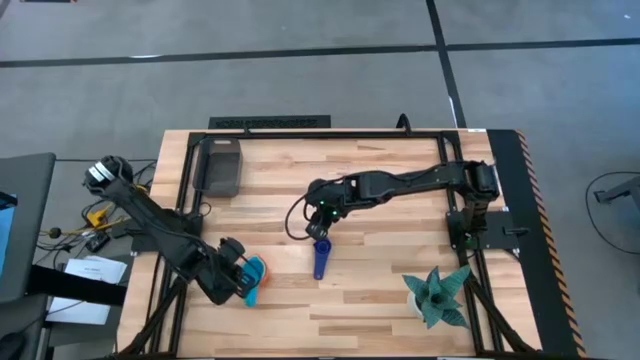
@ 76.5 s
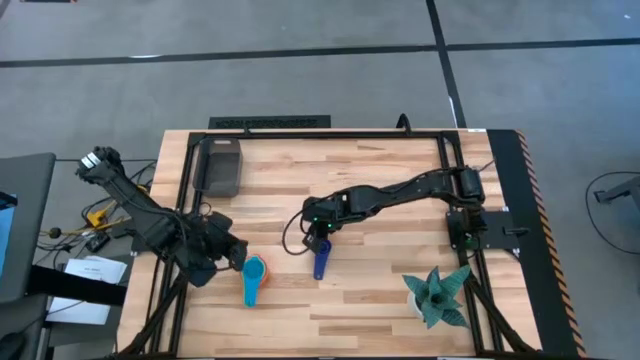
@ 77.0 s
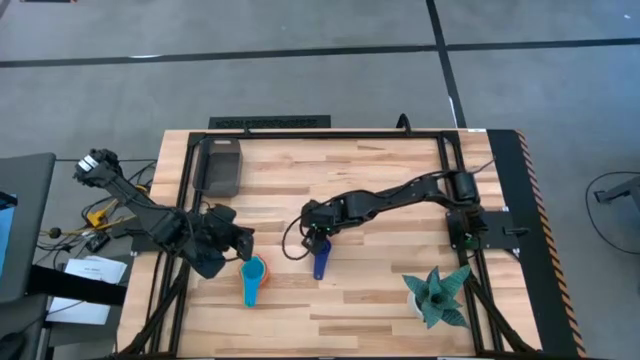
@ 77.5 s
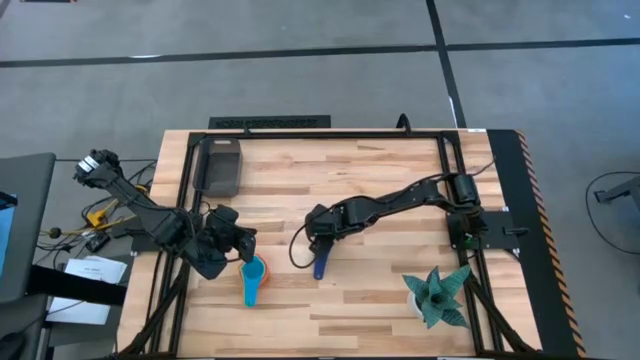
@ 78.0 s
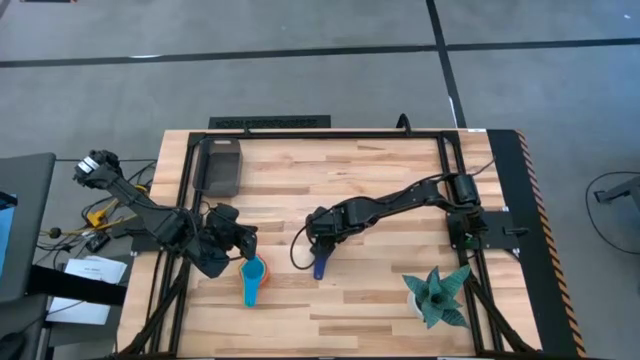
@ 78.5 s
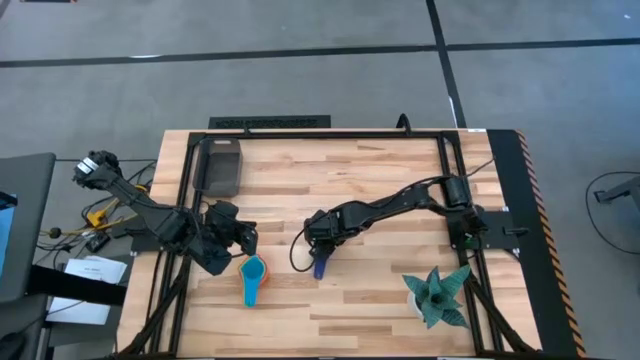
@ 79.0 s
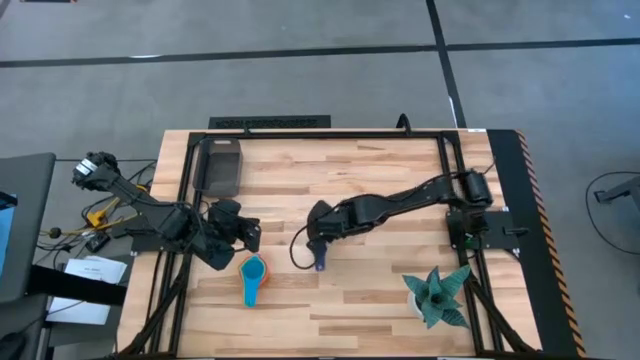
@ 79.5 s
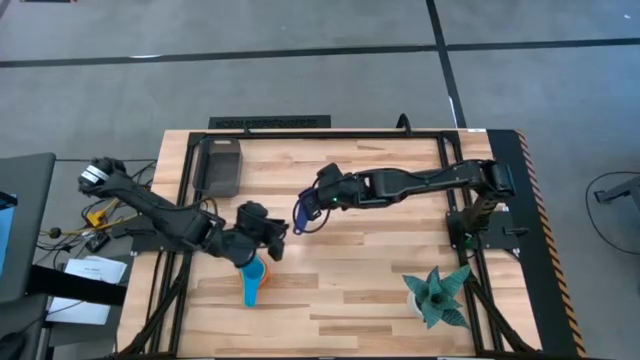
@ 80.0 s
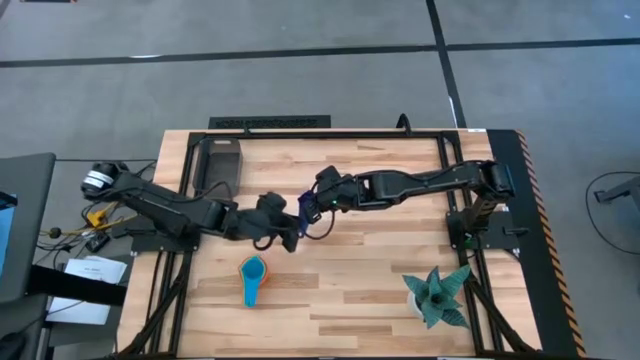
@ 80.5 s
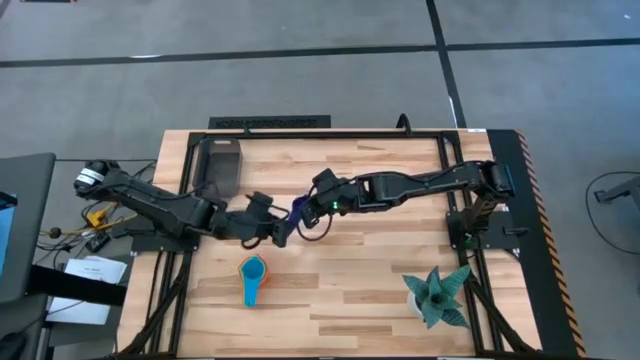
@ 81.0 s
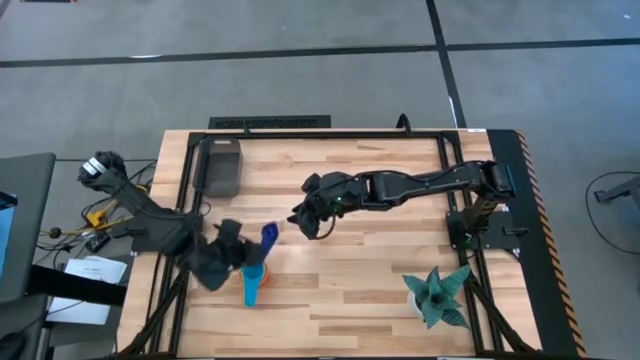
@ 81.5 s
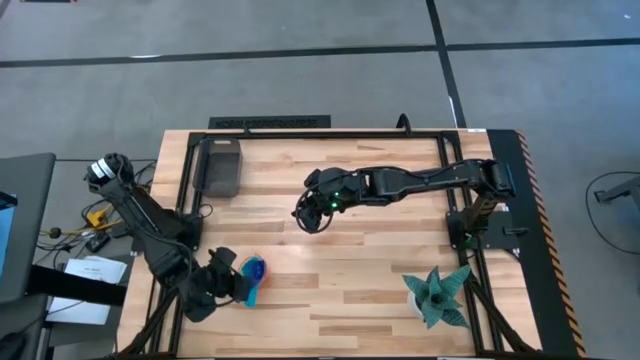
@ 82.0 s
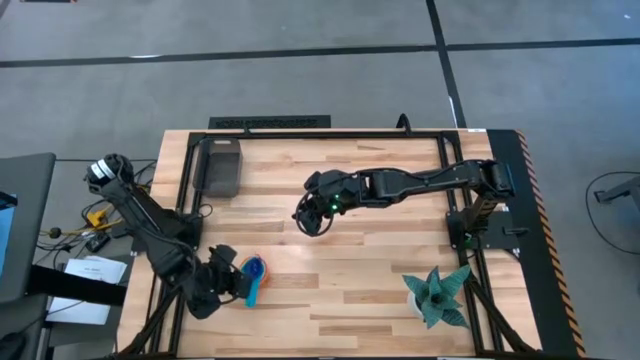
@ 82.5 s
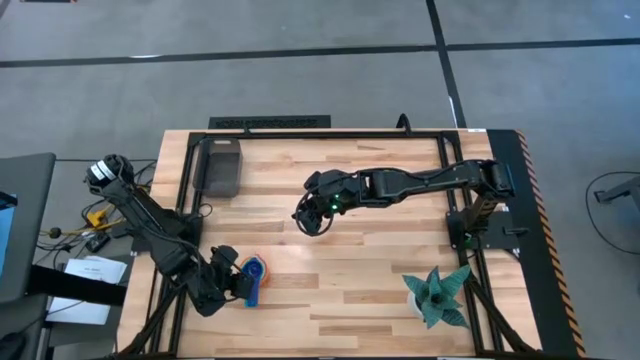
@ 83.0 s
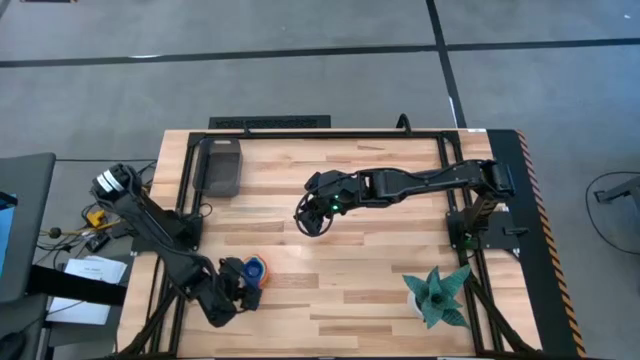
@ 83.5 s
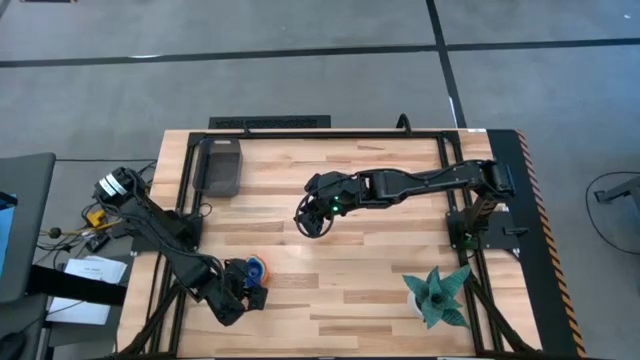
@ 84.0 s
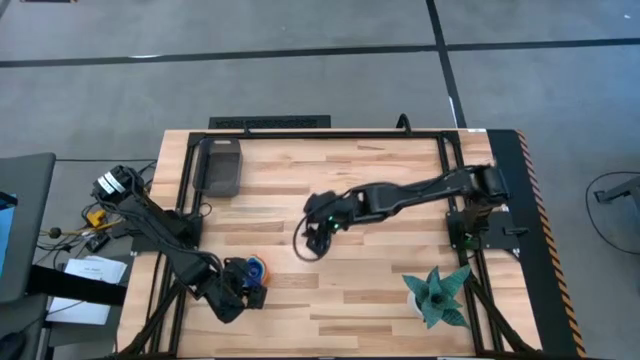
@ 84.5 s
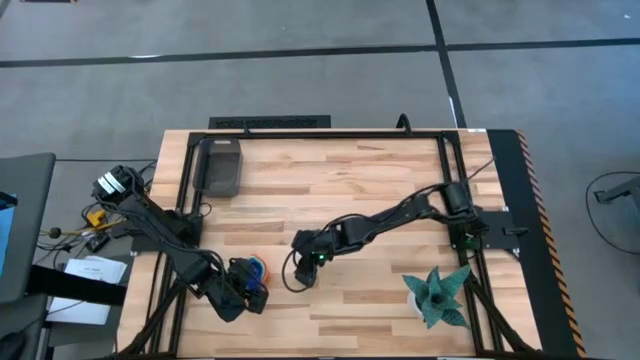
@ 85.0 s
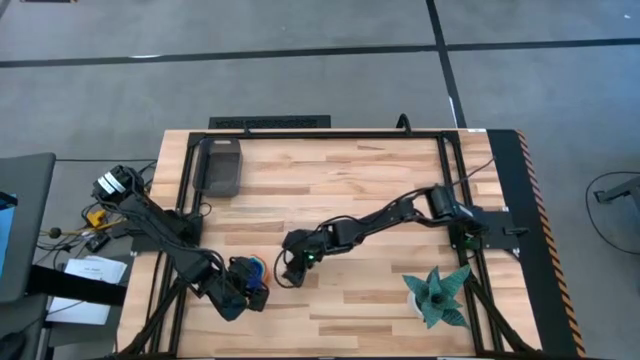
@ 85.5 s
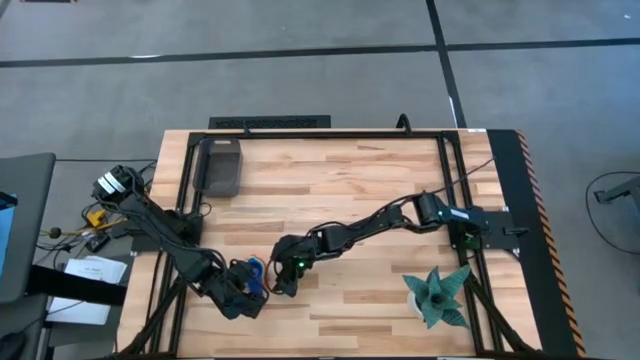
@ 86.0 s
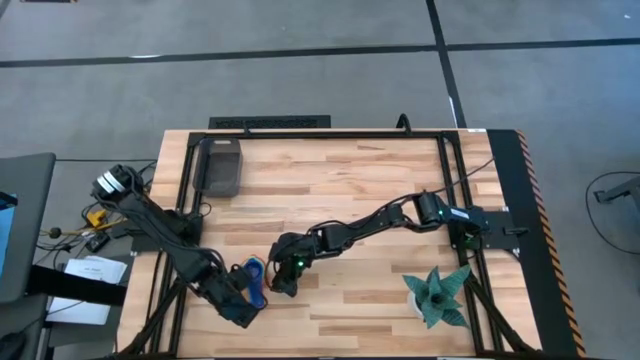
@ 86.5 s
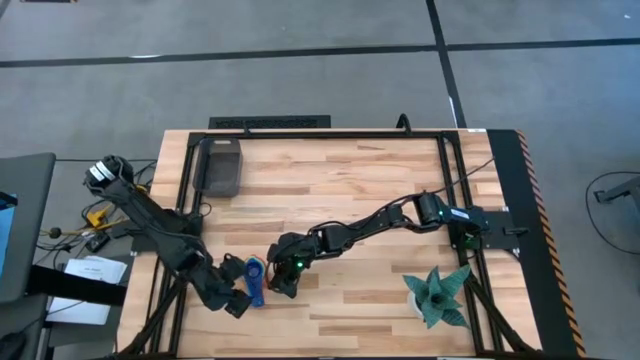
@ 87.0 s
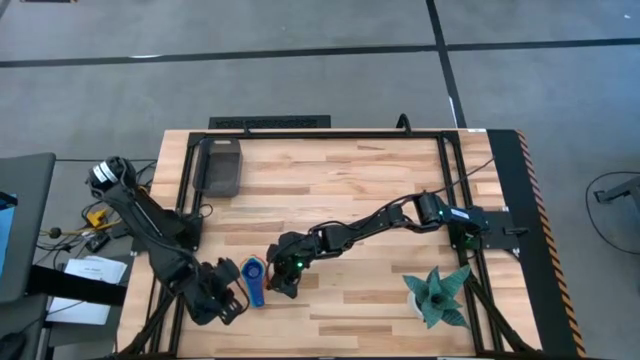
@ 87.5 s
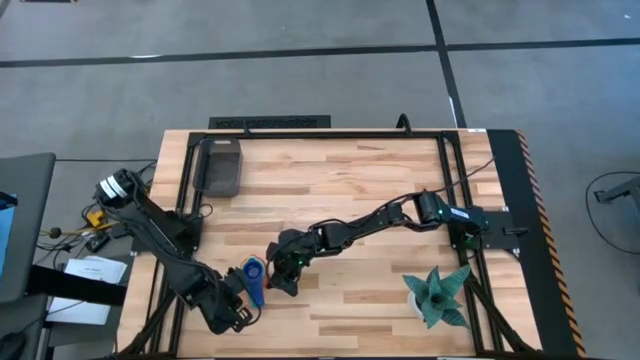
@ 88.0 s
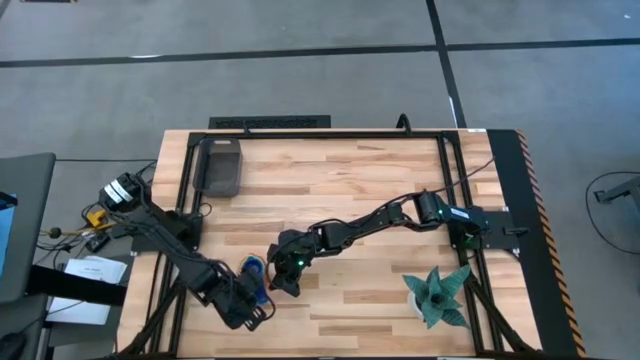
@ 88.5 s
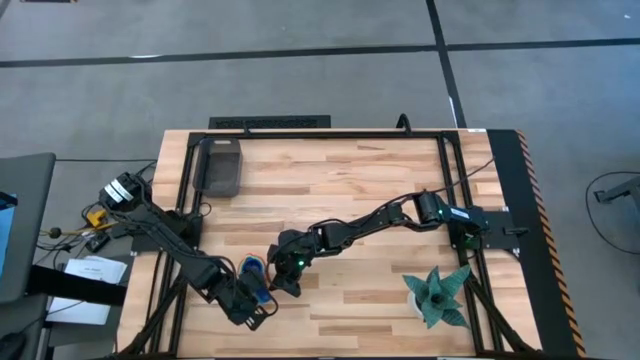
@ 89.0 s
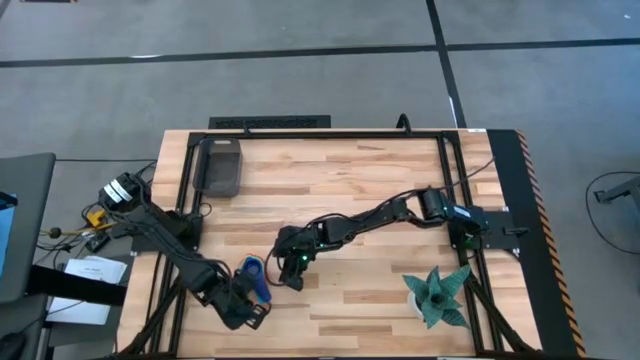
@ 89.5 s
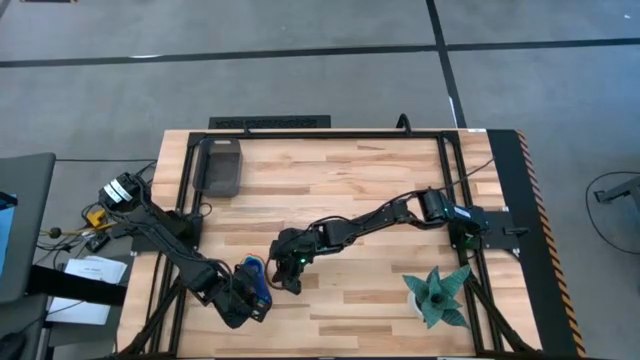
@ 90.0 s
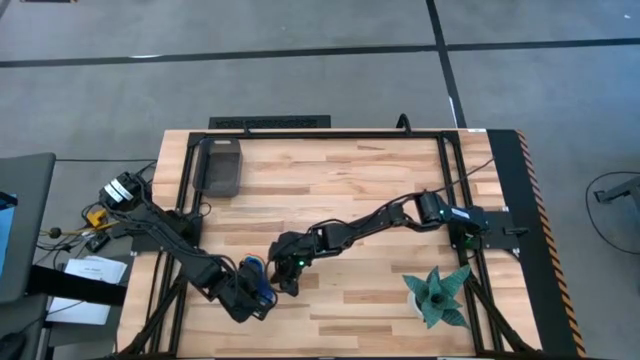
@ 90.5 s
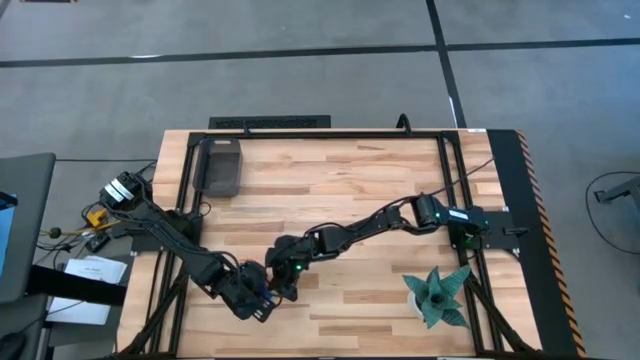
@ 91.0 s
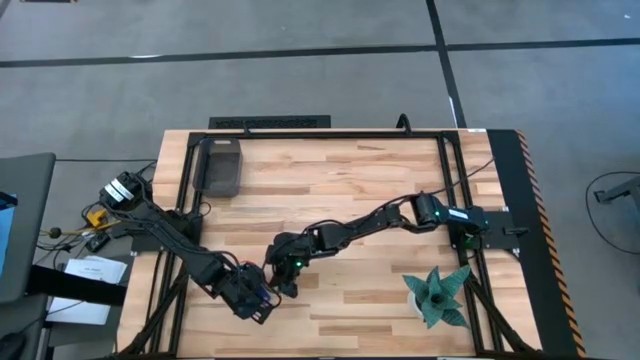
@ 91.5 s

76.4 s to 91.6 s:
Task: Nest measuring cups in basket
Stack the dark blue measuring cup on top of the light blue measuring cup

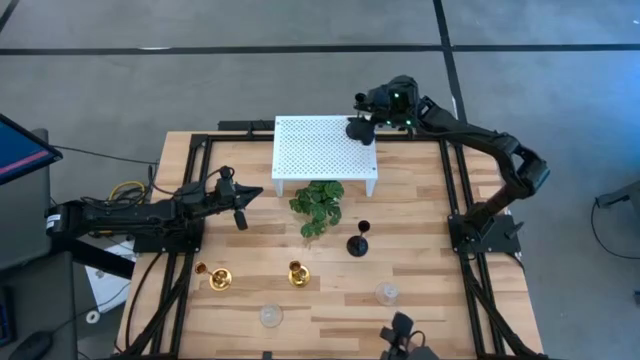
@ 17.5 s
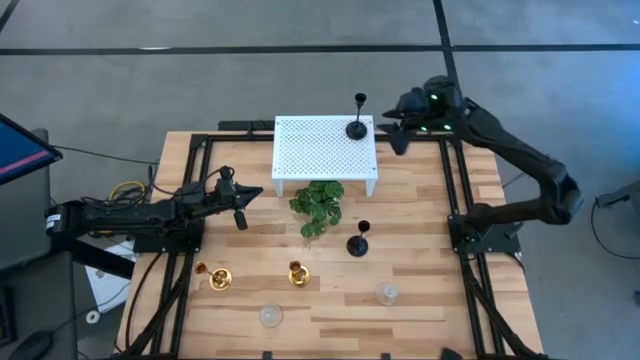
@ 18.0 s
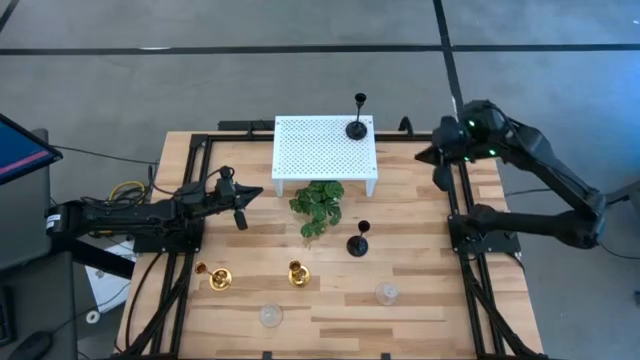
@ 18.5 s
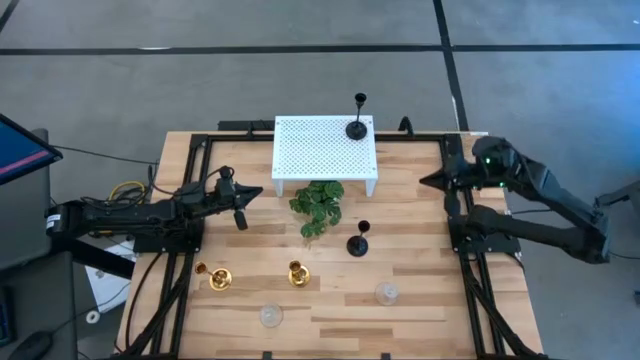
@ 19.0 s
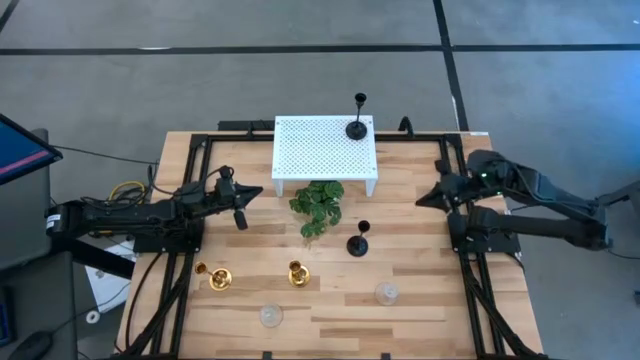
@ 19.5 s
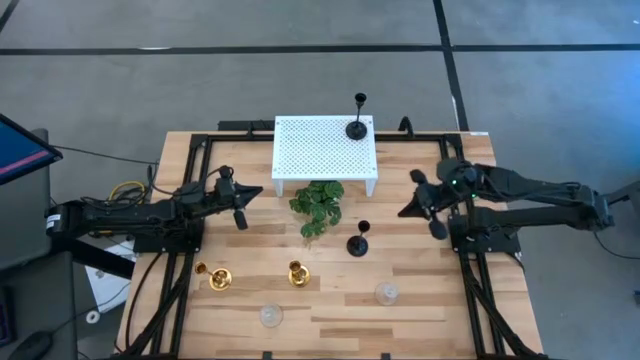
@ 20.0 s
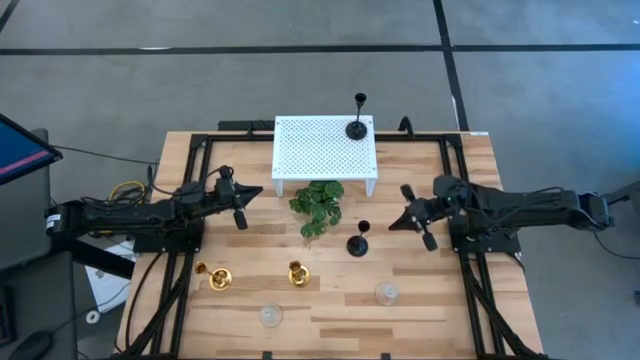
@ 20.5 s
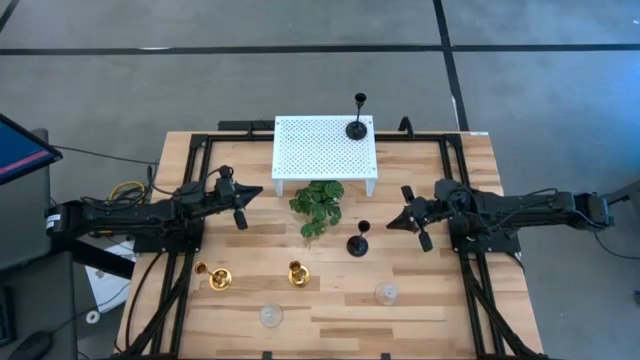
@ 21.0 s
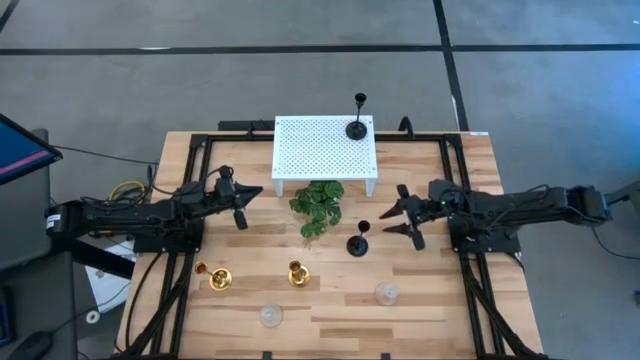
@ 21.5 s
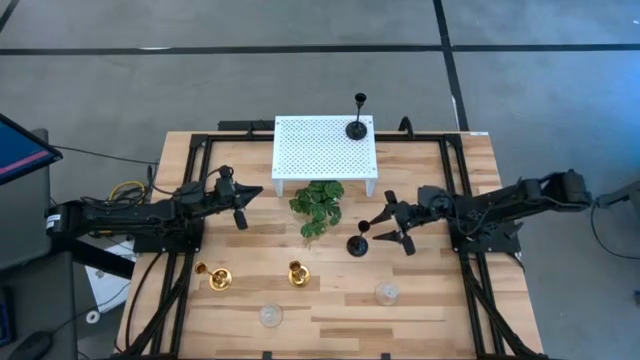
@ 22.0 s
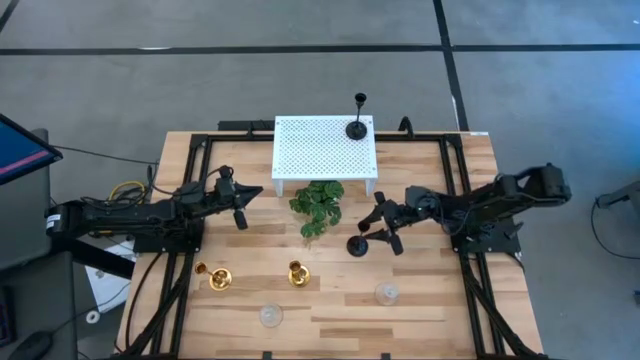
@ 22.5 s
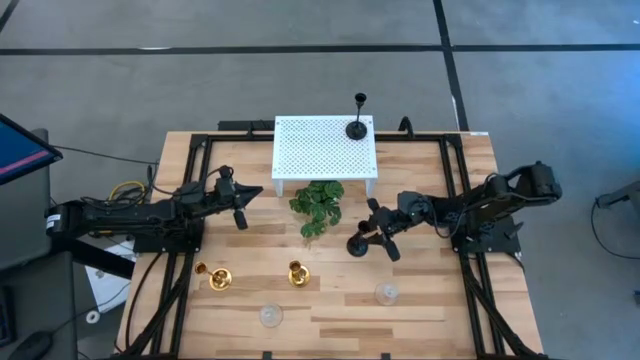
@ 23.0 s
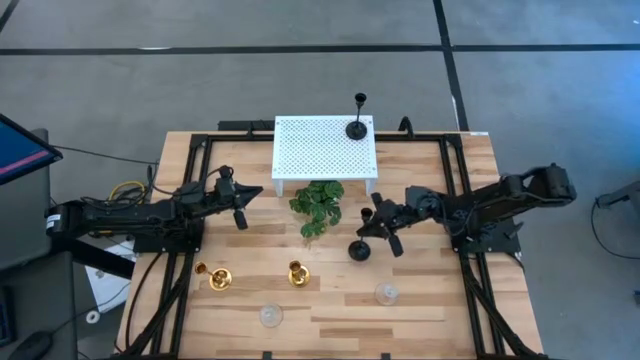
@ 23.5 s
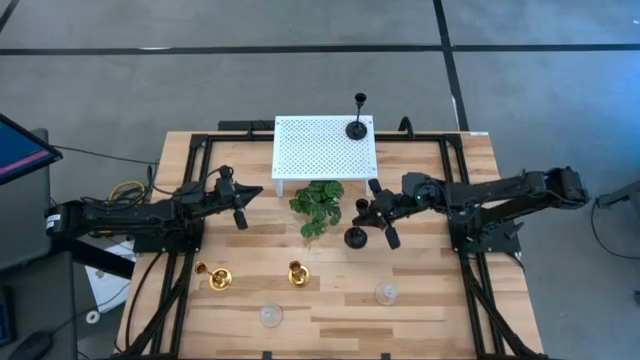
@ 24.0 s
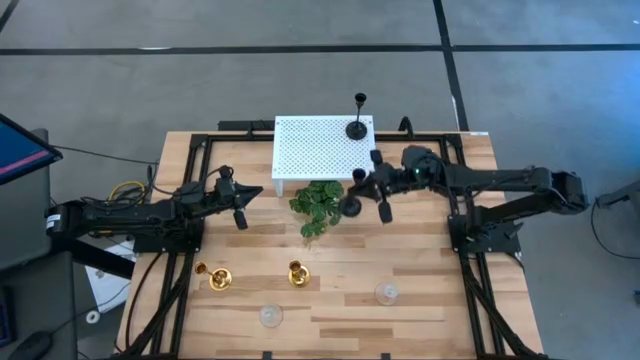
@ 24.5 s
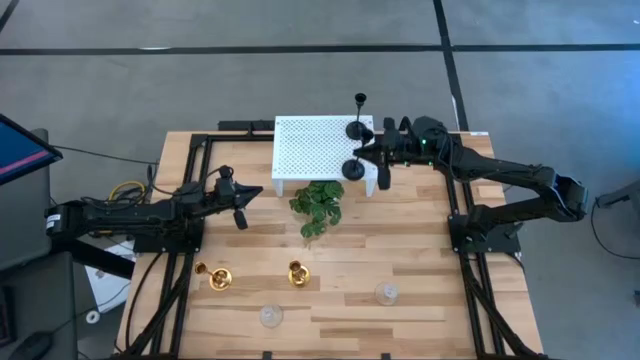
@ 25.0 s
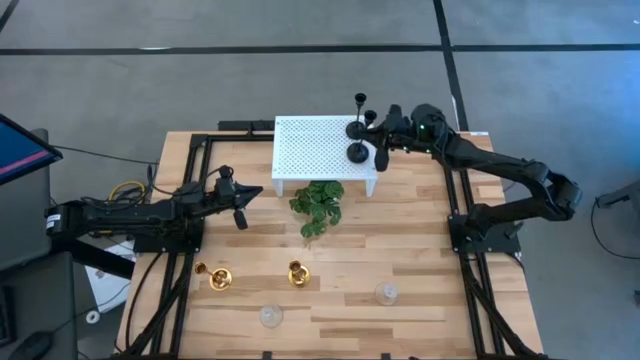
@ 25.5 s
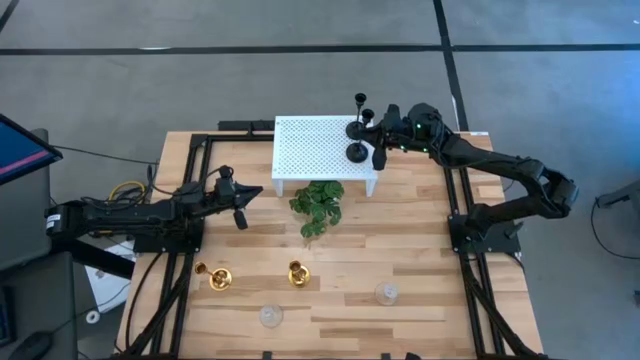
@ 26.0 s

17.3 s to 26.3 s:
Task: Pick & Place candle stick holders
Put the black candle holder on the shelf aligned with the other black candle holder
